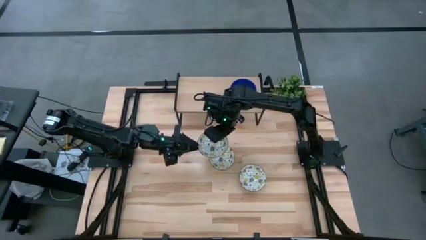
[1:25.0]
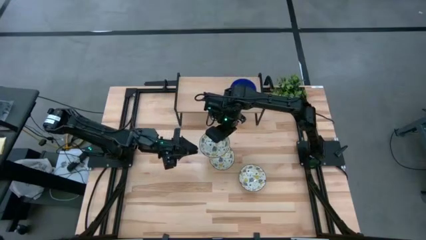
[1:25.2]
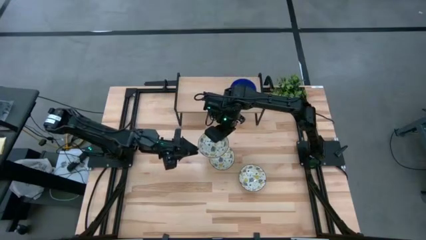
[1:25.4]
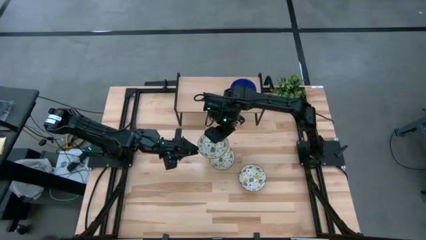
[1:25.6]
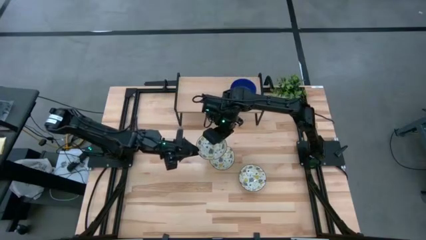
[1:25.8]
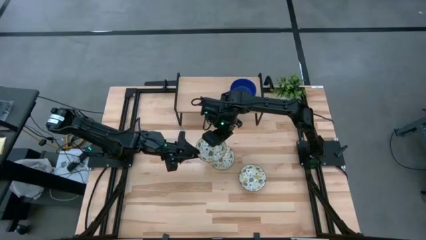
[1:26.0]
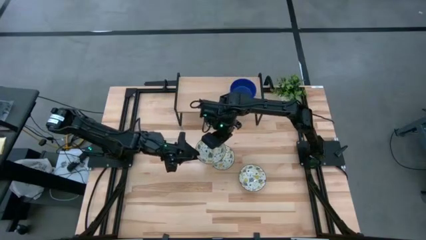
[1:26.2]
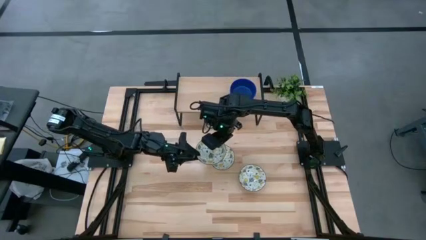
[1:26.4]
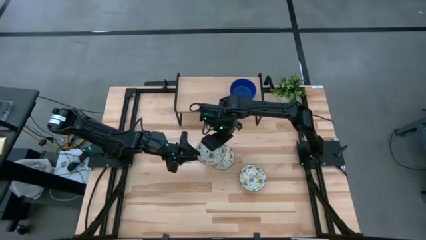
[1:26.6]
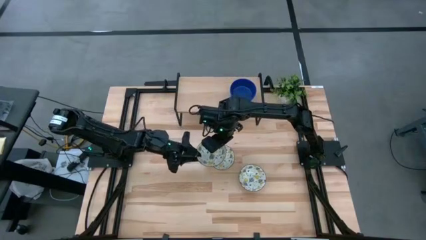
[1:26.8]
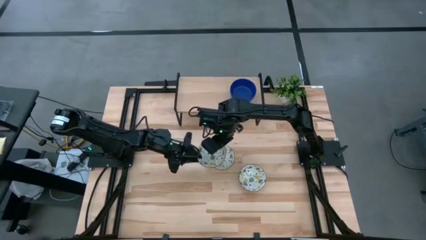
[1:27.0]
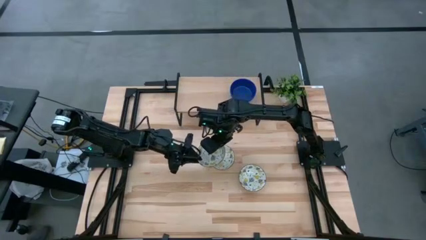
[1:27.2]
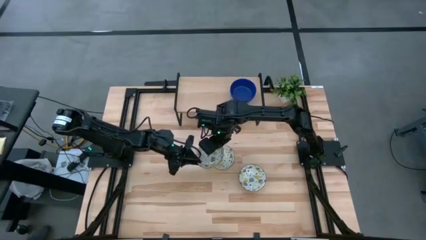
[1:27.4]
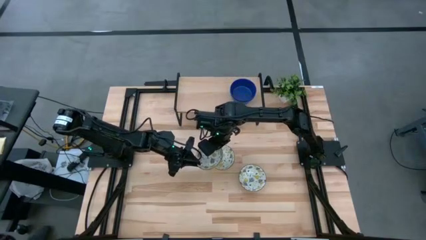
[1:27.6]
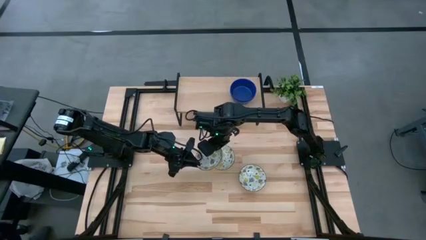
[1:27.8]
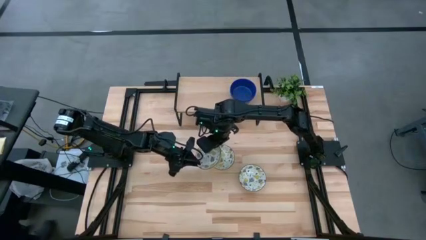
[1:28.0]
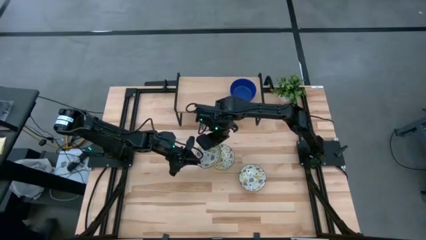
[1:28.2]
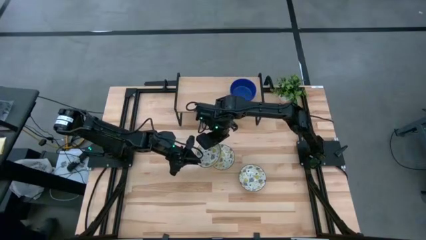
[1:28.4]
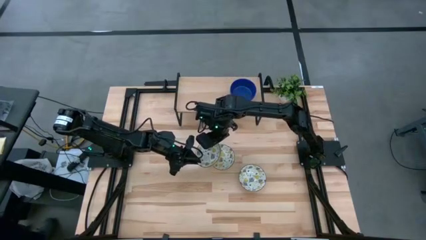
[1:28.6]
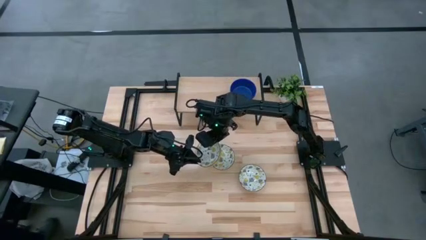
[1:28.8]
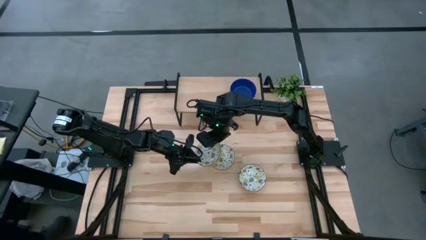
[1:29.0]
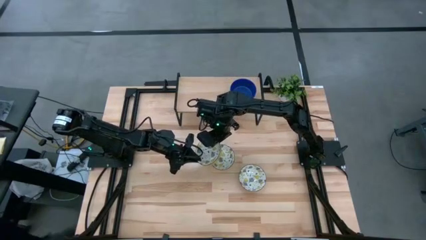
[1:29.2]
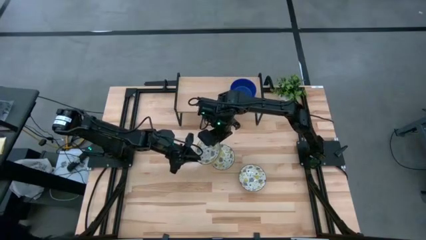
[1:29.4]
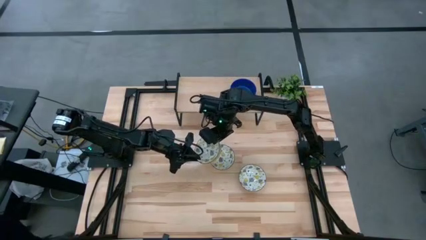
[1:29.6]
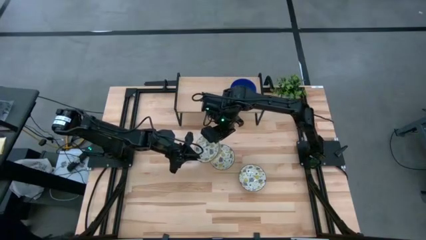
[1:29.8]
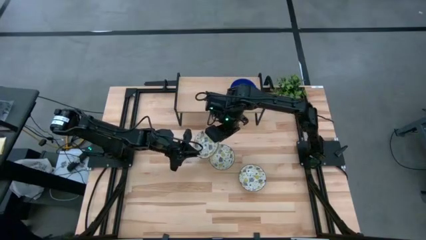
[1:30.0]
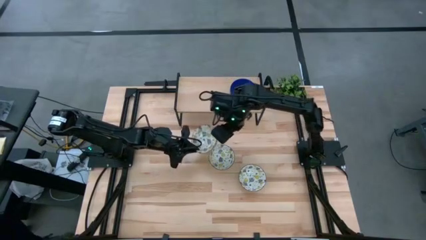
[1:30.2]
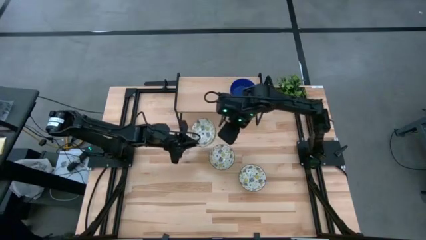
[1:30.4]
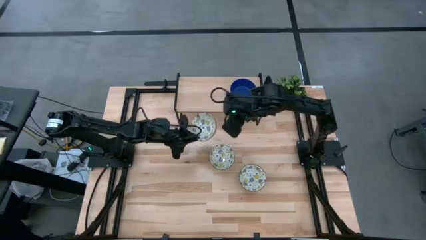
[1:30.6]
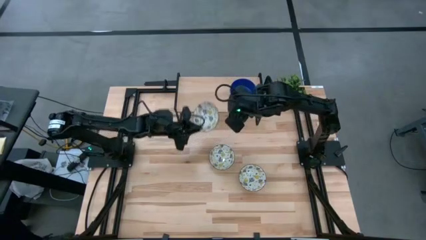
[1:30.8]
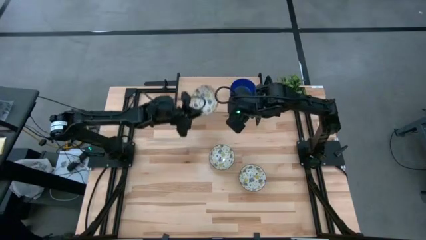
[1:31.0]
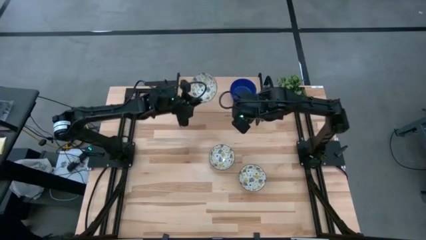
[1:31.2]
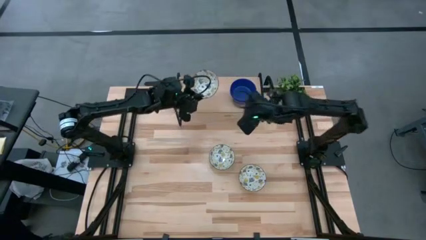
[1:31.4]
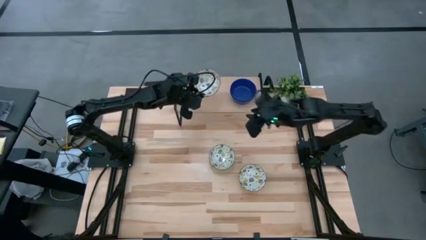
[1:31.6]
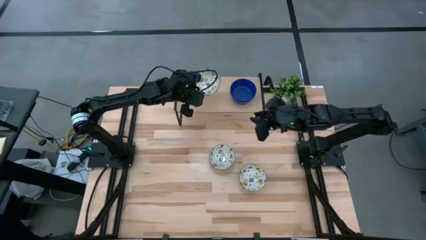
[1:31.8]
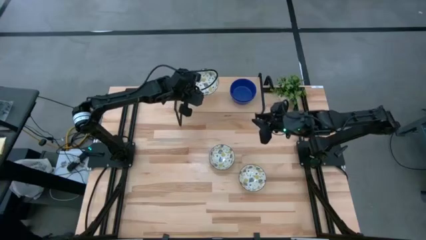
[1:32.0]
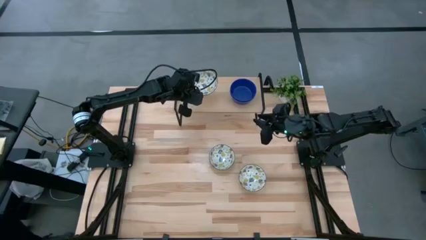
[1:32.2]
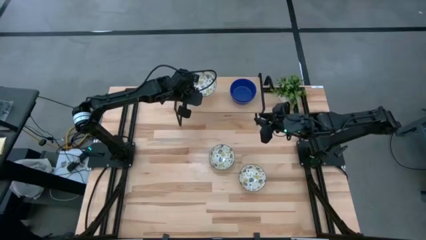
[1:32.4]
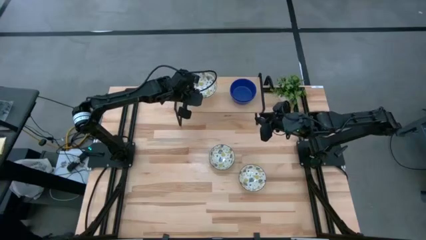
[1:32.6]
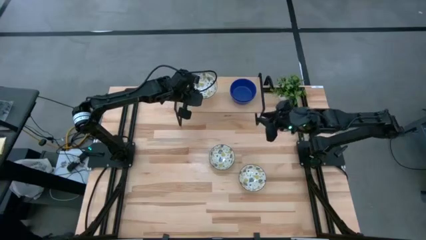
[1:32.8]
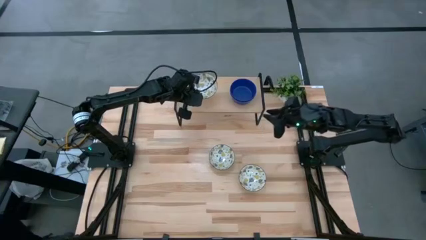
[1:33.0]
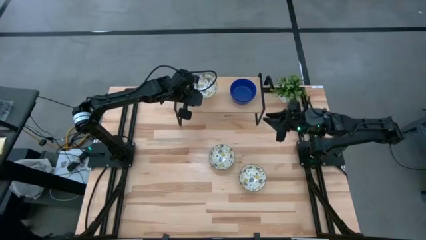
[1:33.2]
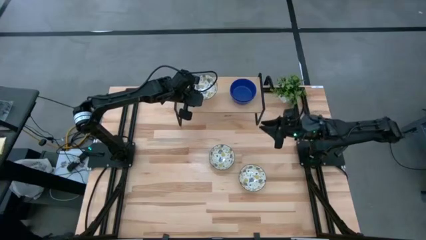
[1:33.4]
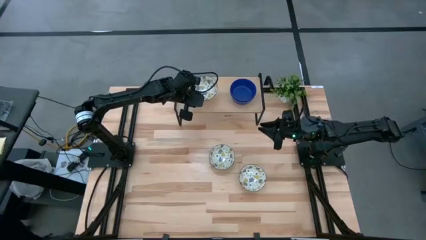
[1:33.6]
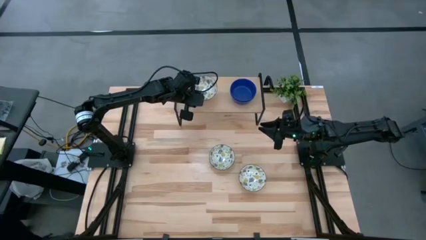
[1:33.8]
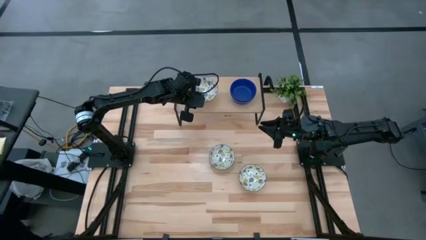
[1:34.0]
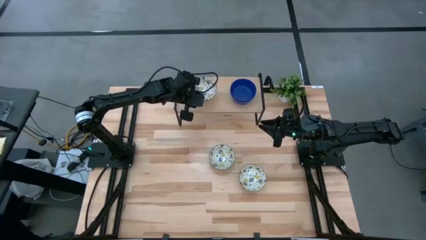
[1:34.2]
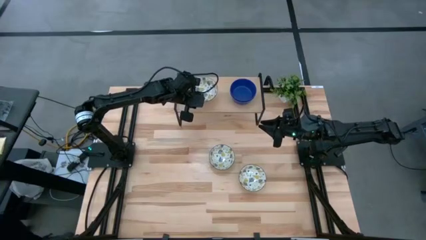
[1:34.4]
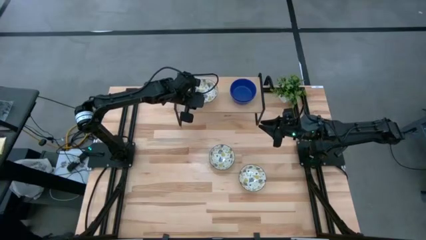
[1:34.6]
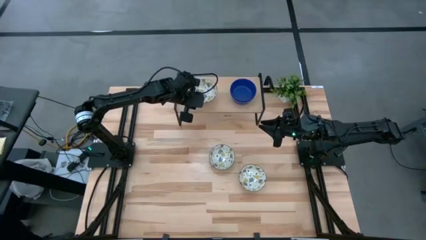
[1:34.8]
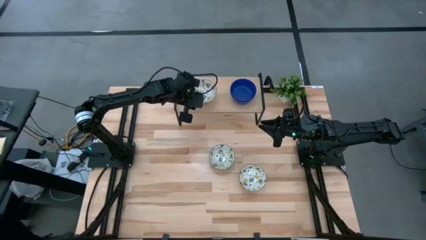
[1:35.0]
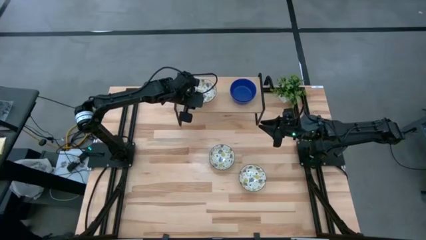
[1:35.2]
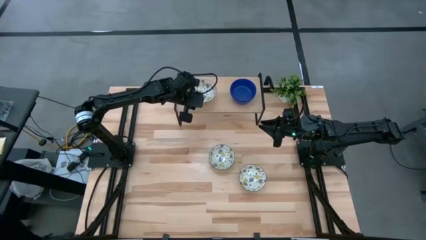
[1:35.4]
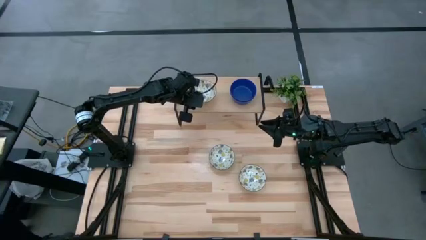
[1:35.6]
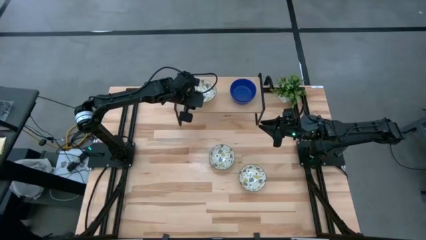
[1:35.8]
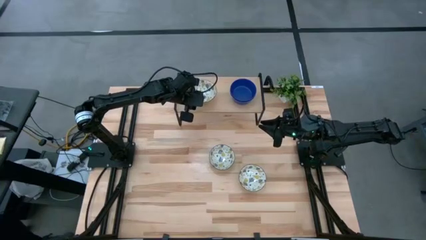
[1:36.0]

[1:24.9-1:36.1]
Task: Pick & Place Mini bowls
Put the top white patterned bowl on the shelf

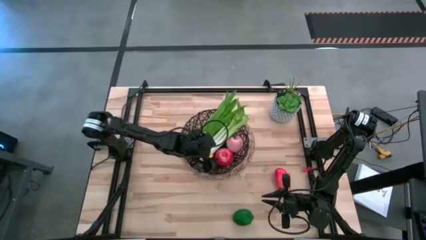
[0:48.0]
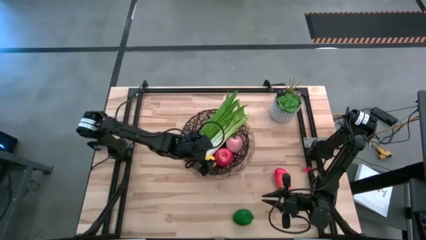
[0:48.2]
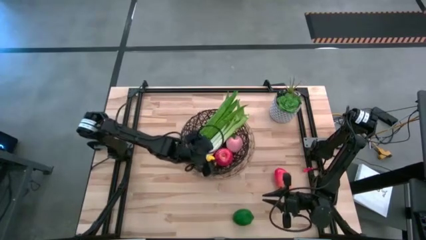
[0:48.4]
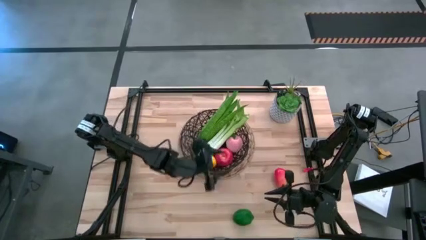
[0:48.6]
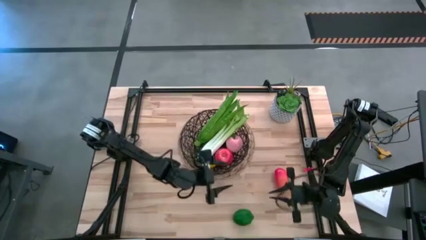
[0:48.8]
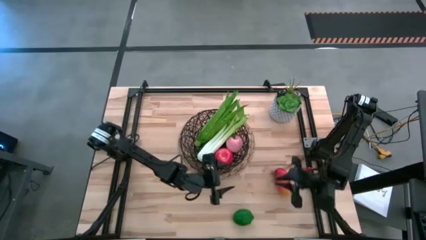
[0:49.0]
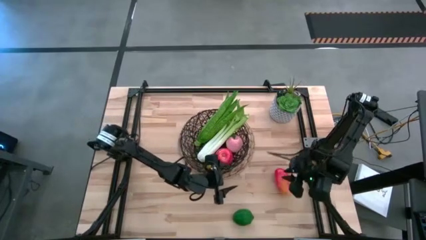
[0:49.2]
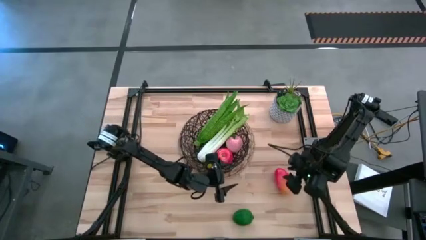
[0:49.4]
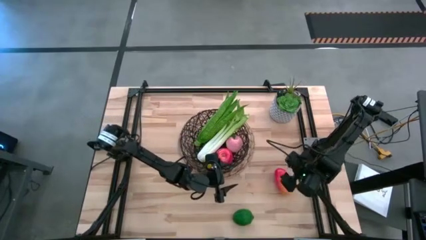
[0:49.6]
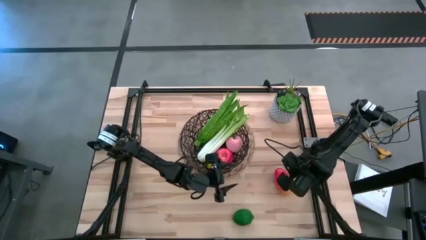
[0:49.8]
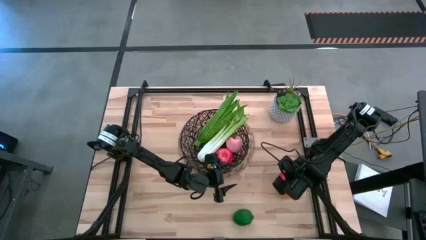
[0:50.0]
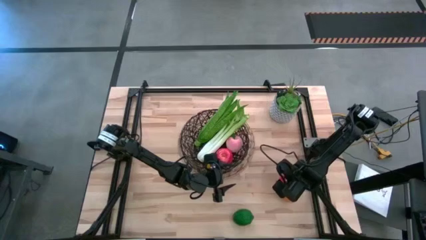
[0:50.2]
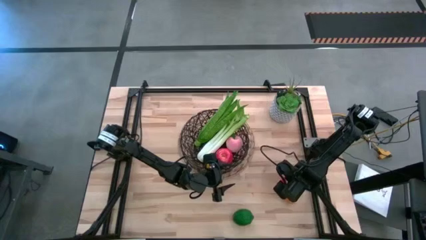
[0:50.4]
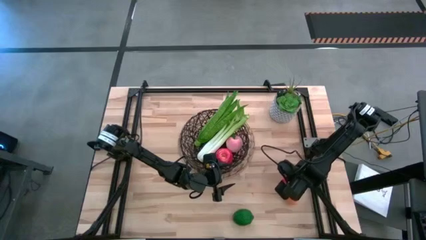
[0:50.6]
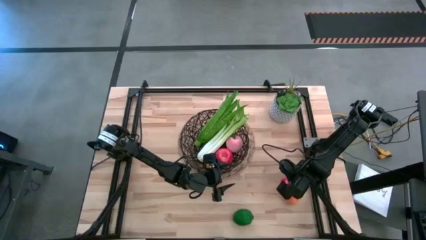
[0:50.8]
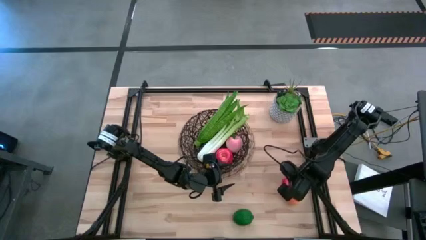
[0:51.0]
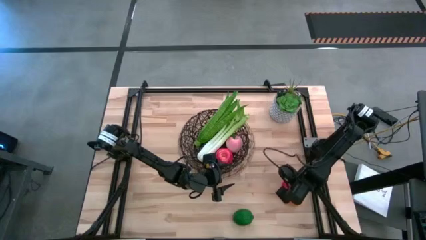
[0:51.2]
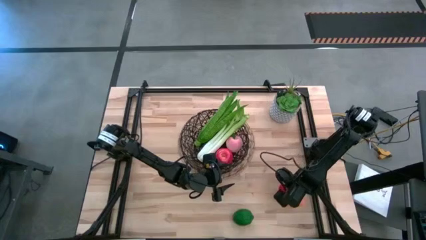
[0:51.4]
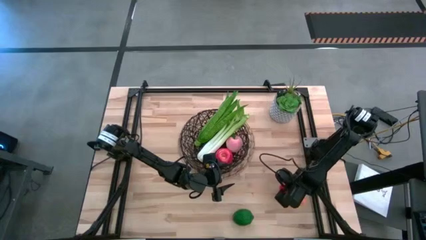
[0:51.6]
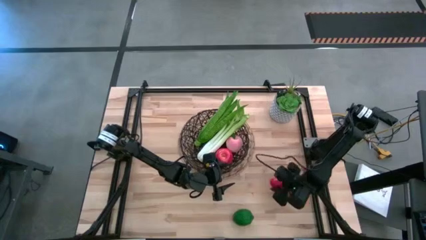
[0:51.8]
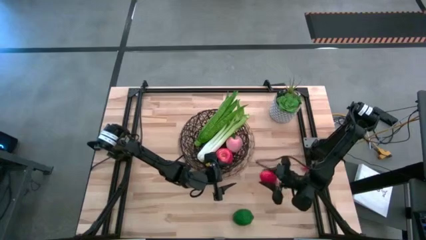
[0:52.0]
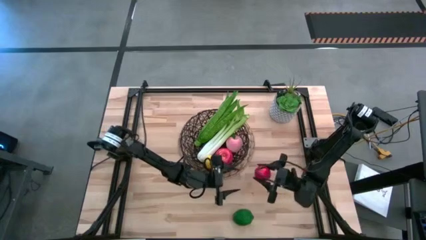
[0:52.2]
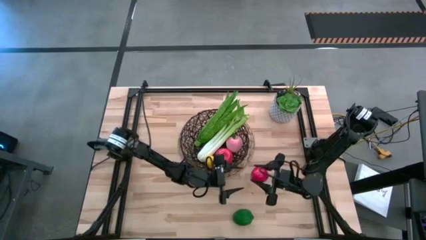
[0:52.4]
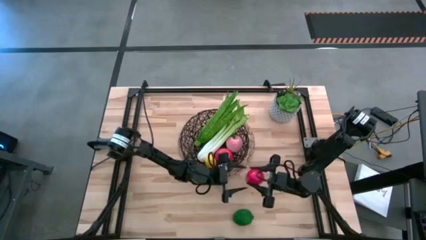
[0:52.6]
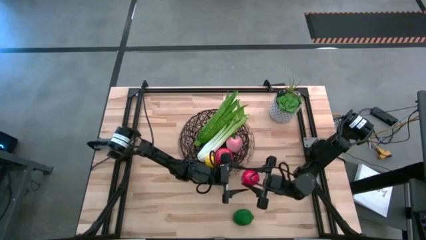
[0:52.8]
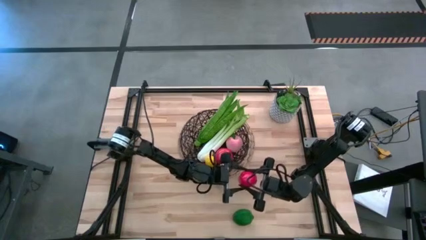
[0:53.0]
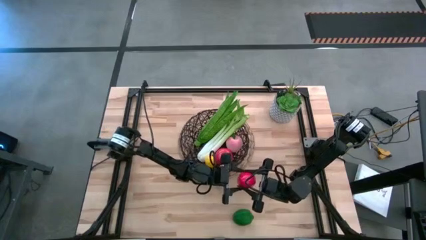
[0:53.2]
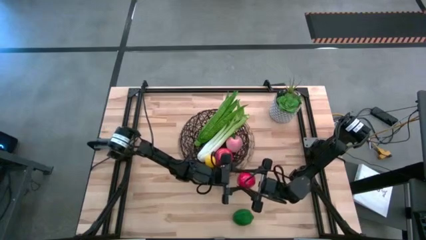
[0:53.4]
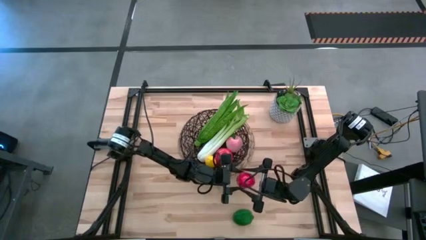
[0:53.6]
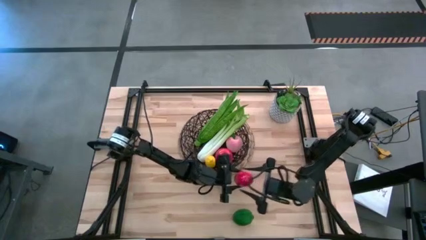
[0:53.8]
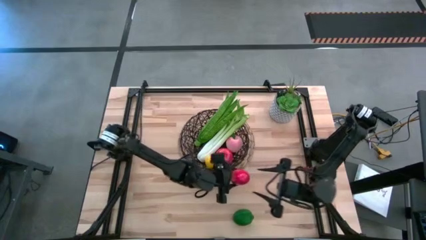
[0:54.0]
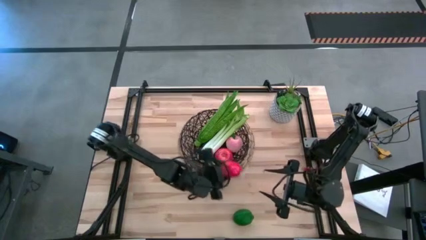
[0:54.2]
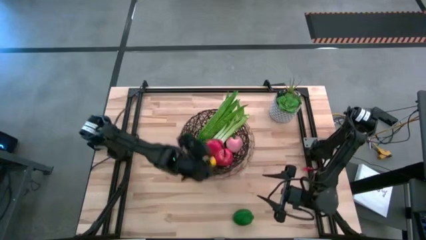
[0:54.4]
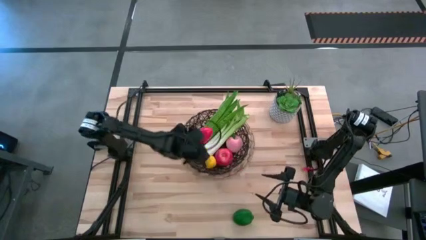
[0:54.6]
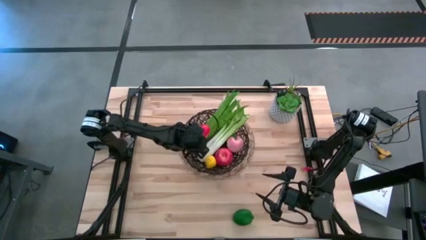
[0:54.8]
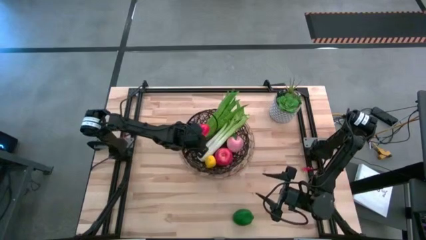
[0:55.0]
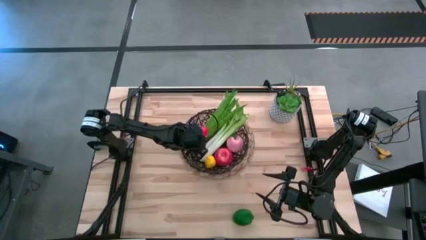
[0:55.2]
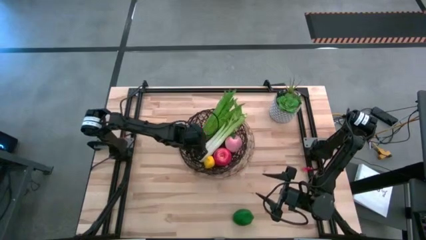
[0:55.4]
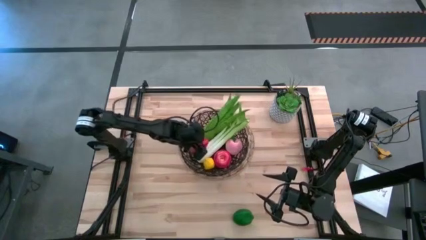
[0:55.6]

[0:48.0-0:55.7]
Task: Build produce basket
Put the orange mango into the black mesh basket
